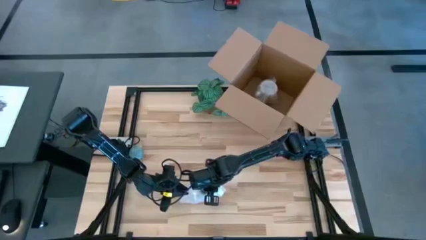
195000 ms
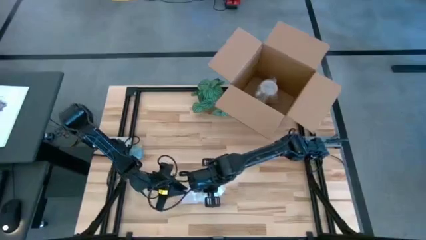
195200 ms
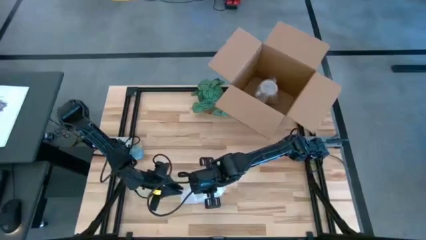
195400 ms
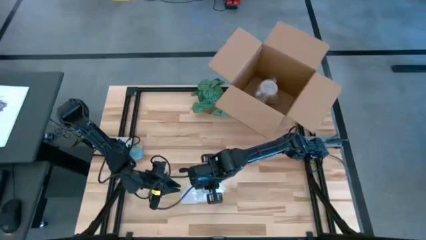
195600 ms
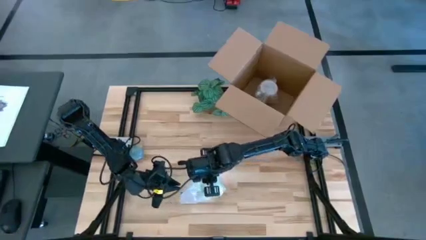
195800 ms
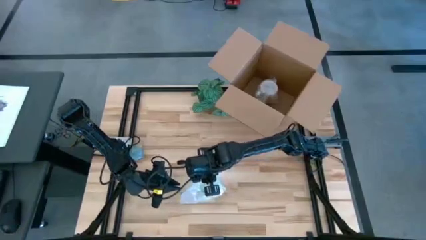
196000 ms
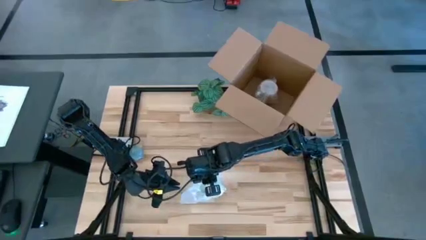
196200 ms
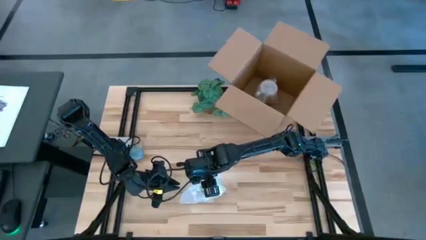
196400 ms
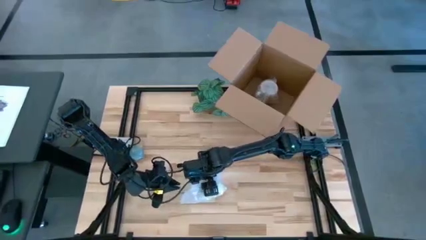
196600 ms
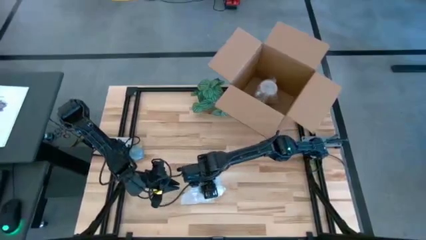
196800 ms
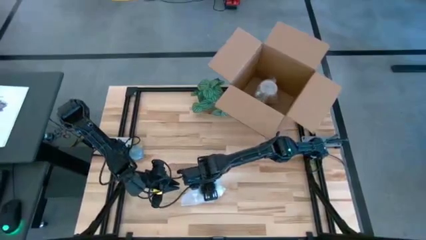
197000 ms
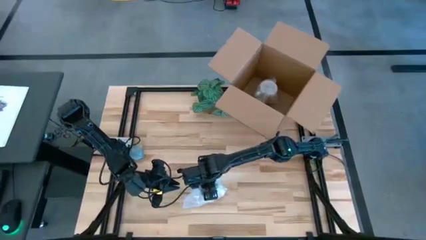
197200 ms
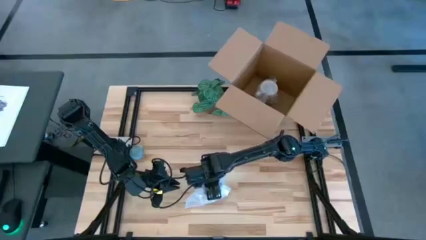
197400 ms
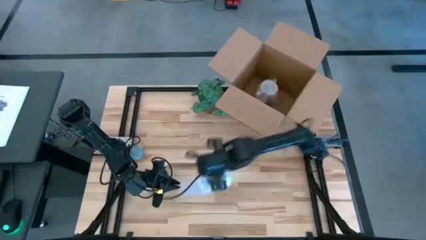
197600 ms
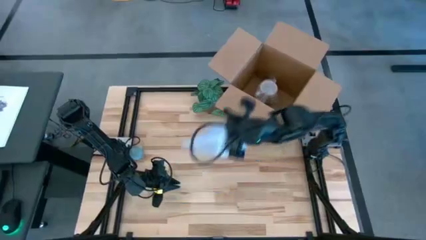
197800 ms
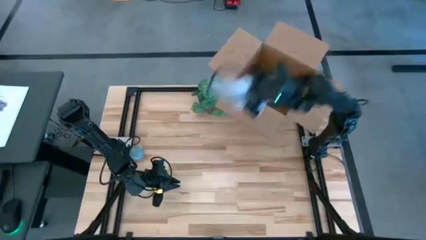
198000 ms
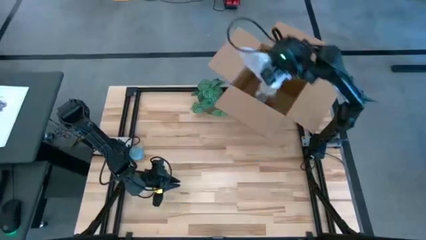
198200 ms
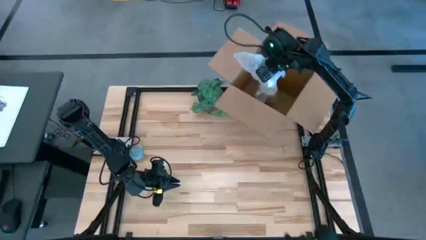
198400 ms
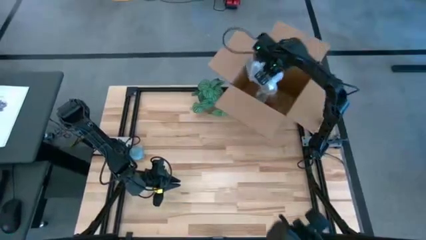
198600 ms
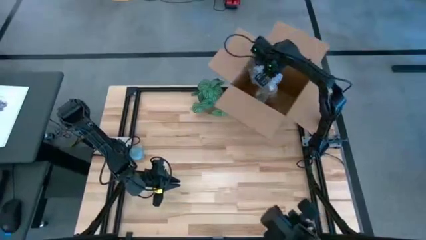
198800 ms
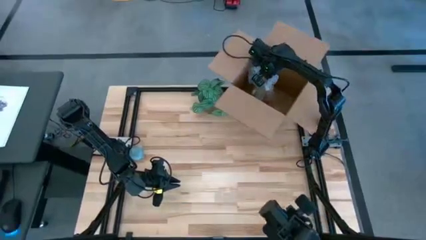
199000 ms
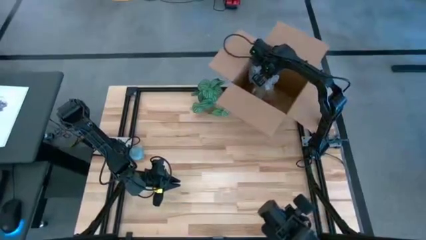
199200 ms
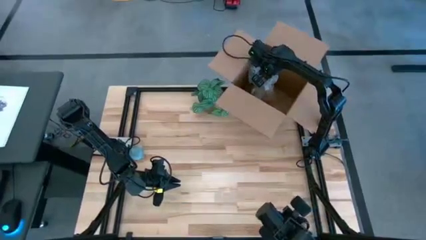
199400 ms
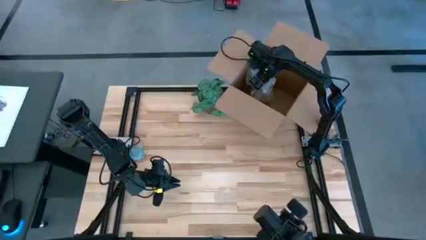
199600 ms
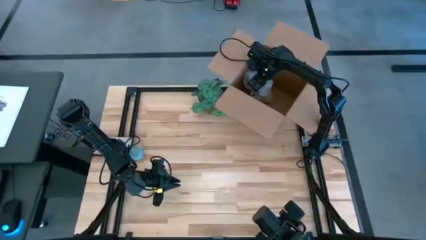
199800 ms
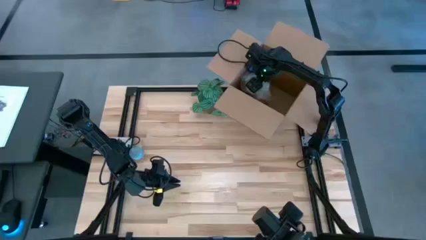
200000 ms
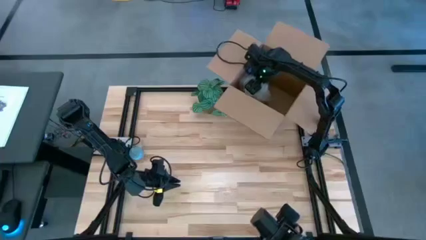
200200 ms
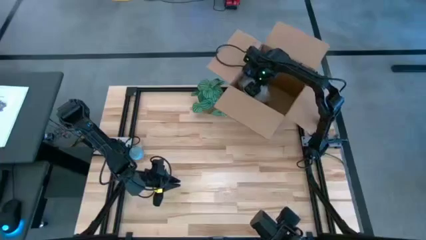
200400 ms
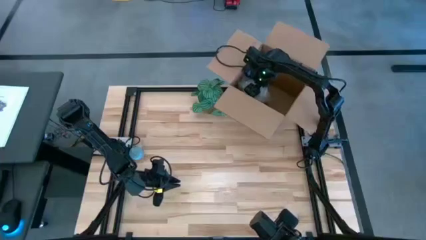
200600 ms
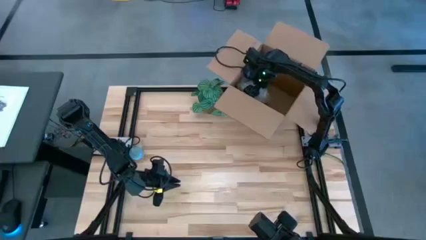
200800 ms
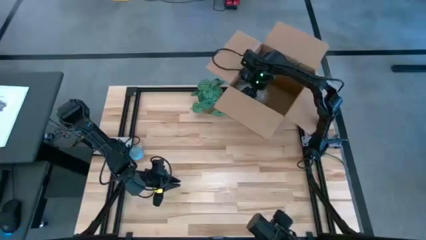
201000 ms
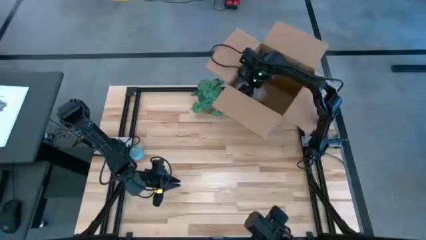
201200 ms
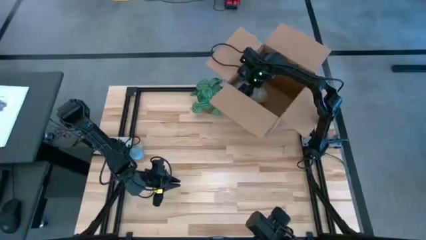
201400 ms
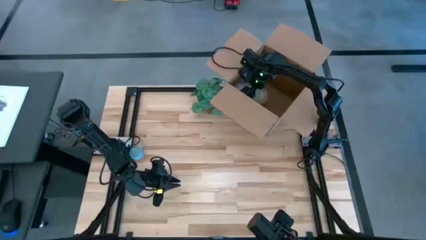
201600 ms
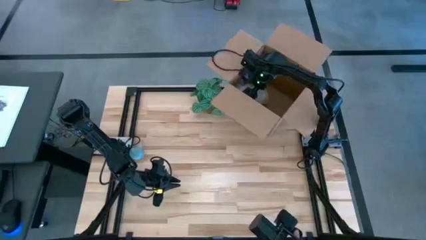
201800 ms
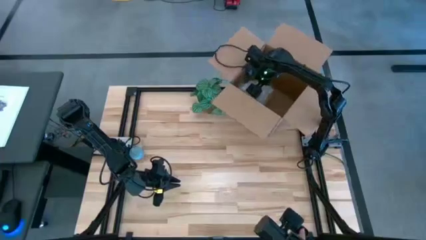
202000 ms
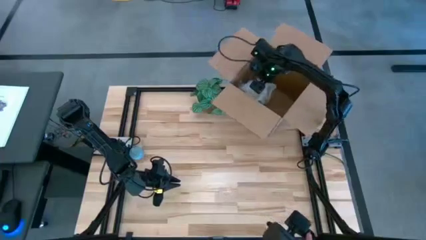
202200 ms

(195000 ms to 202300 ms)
Task: wrap mug
Put the wrapped blue mug into the cardboard box

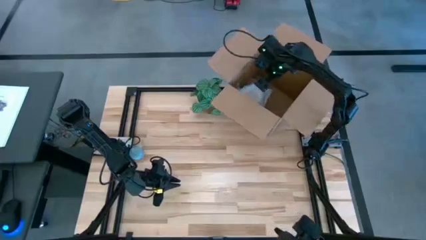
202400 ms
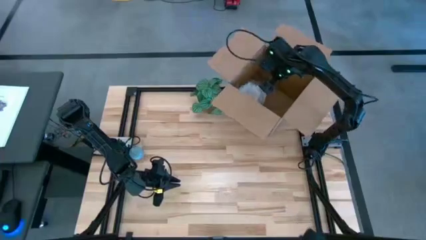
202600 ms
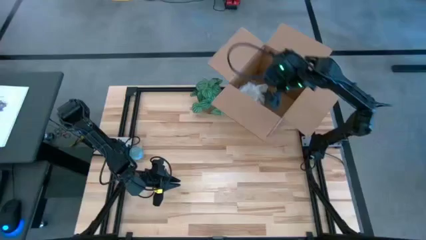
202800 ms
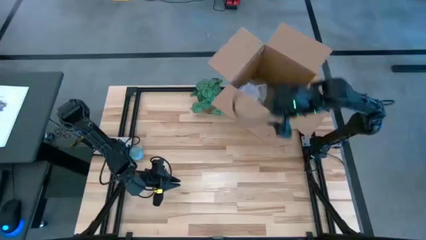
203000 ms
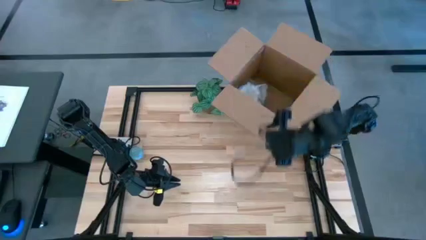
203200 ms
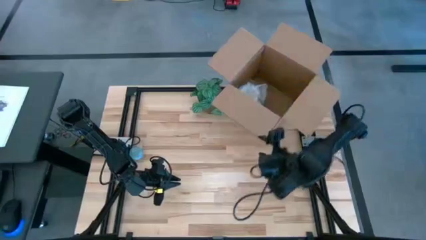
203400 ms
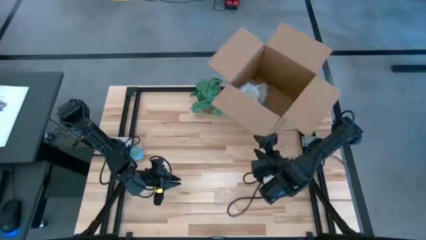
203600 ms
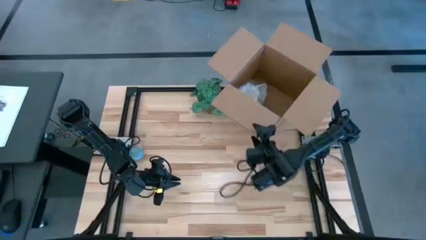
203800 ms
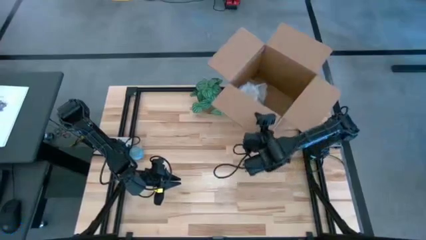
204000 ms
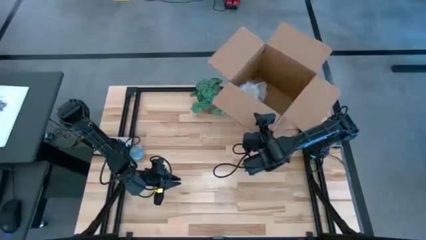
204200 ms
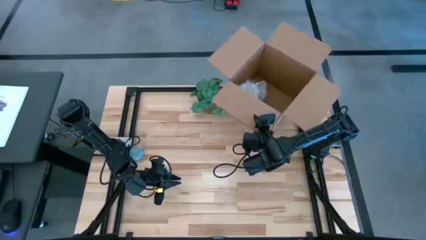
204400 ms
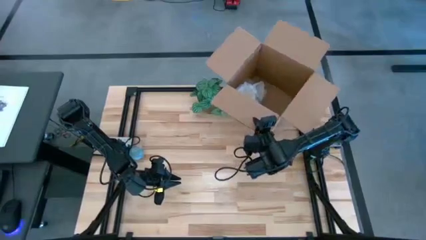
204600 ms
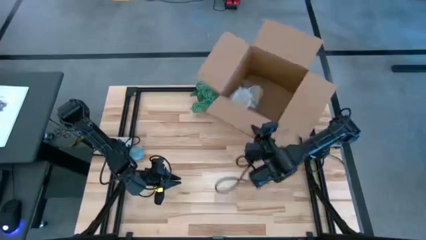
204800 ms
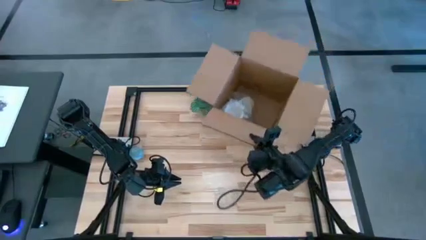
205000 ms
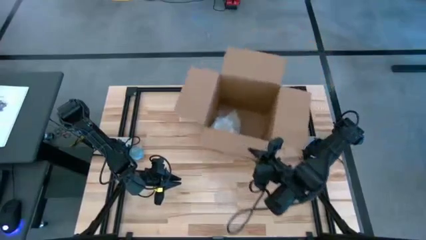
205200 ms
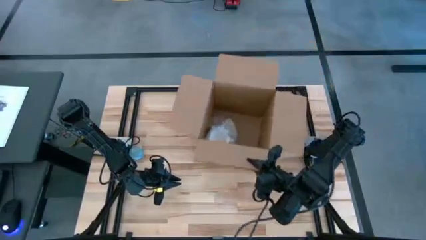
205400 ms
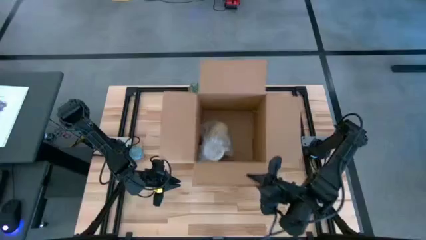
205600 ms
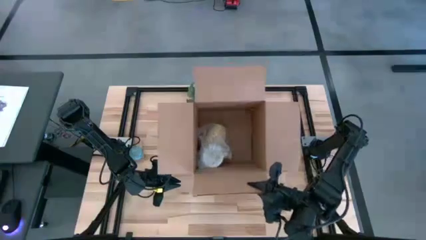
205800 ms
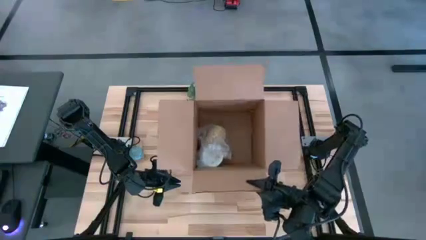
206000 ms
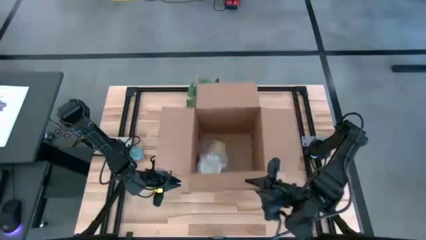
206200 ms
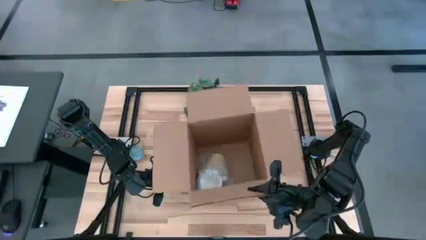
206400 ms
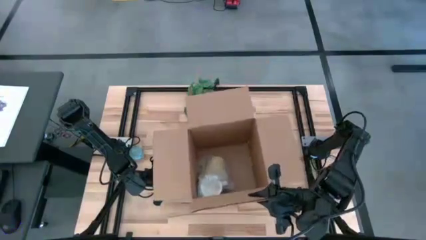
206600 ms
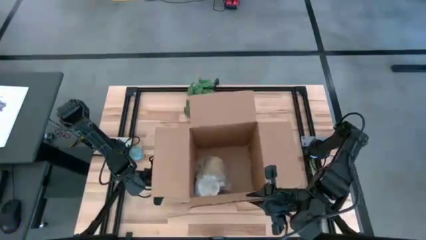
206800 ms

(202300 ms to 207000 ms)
Move the cardboard box to the center of the table

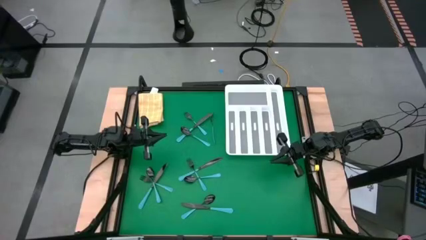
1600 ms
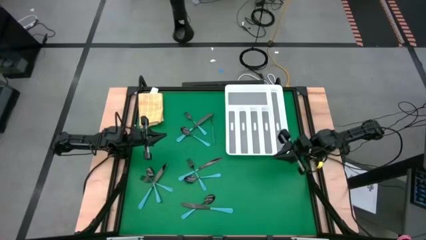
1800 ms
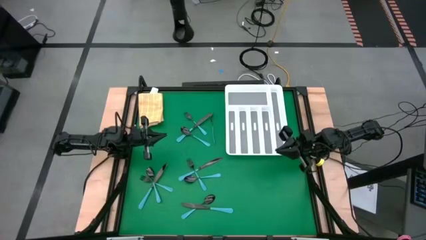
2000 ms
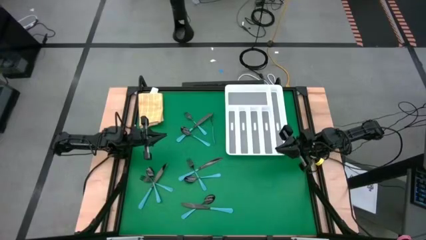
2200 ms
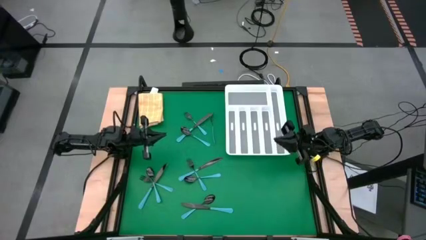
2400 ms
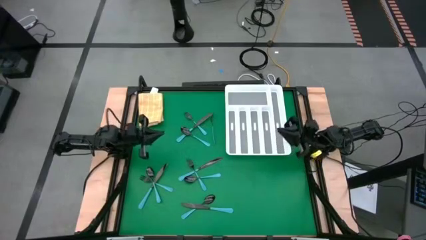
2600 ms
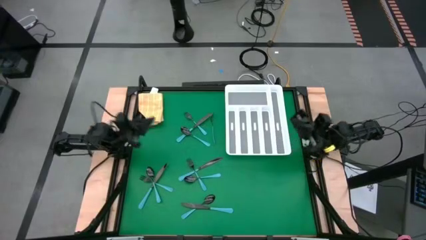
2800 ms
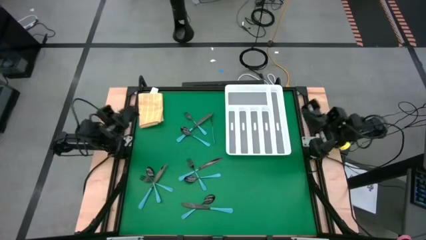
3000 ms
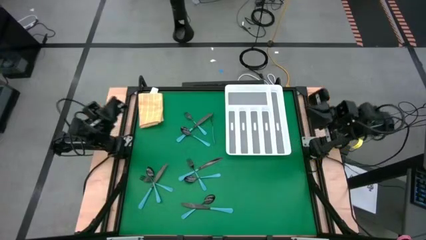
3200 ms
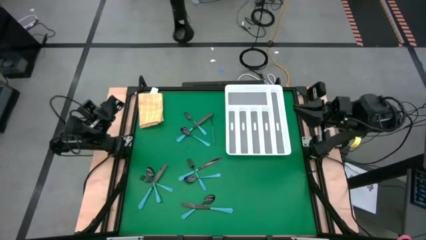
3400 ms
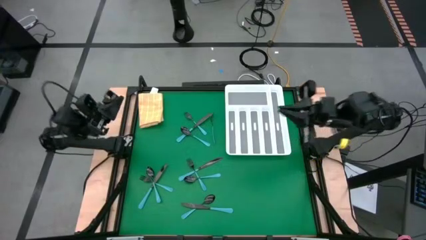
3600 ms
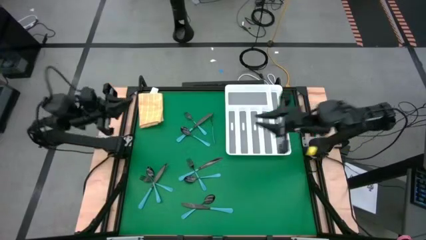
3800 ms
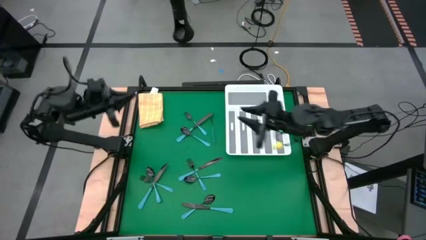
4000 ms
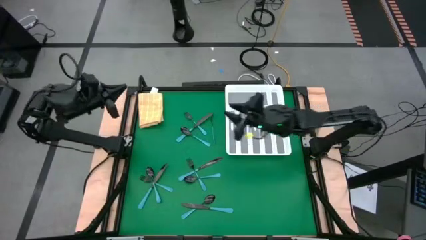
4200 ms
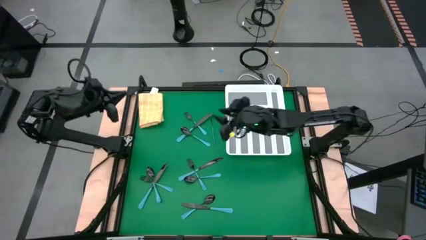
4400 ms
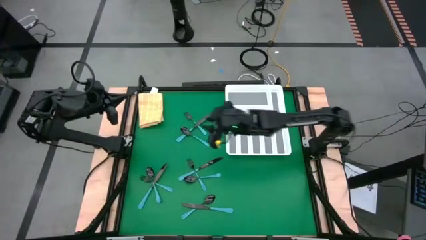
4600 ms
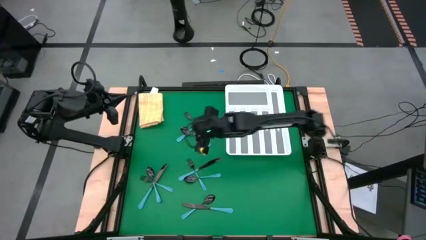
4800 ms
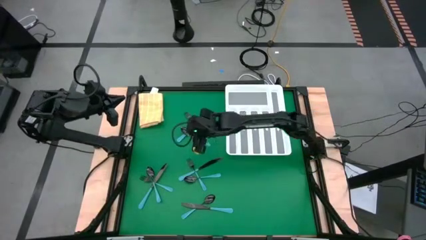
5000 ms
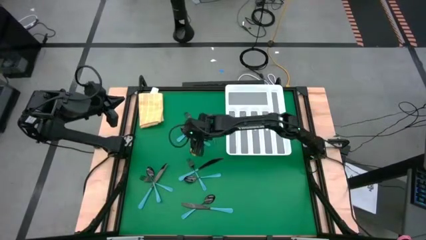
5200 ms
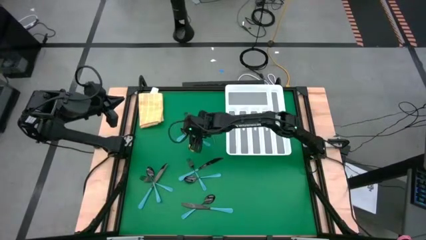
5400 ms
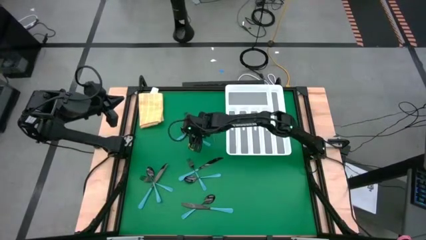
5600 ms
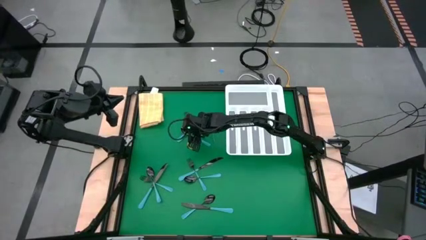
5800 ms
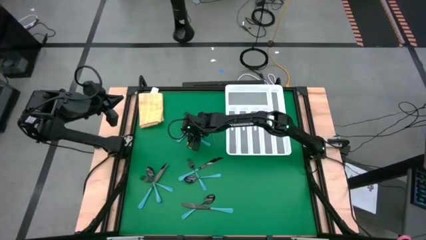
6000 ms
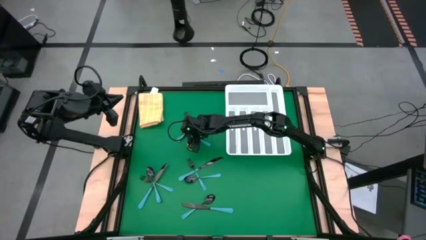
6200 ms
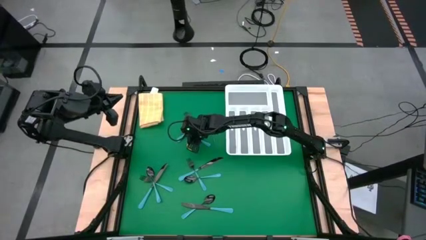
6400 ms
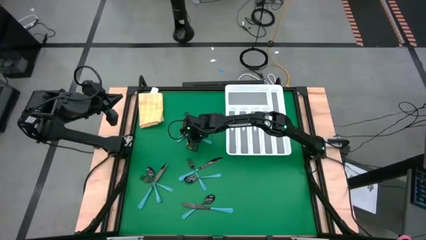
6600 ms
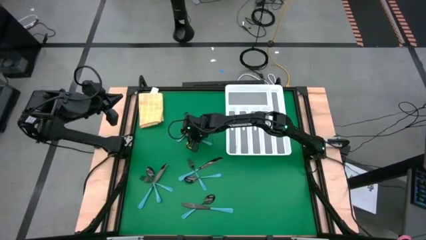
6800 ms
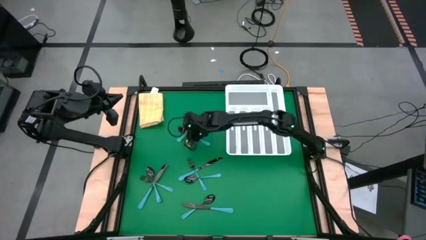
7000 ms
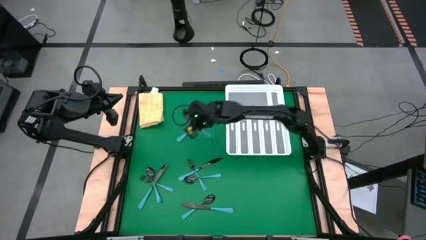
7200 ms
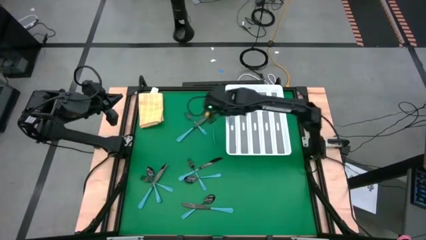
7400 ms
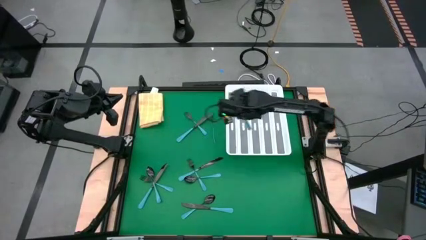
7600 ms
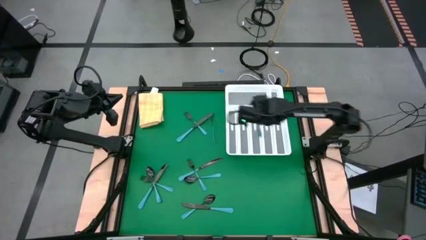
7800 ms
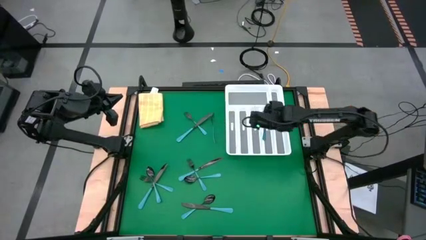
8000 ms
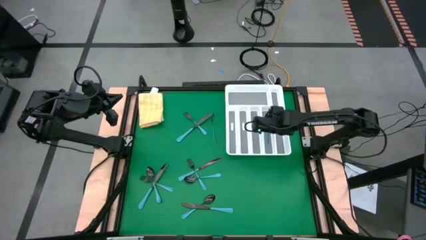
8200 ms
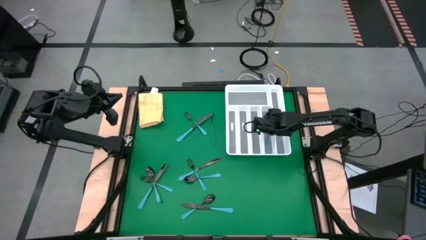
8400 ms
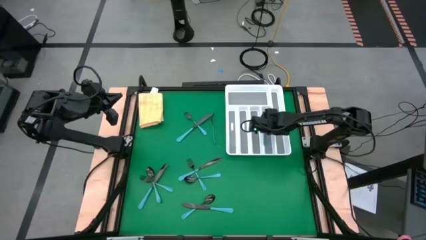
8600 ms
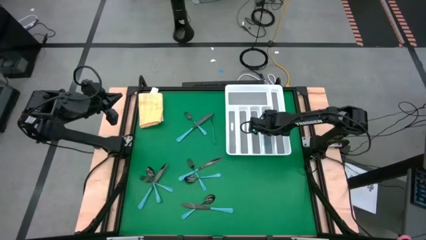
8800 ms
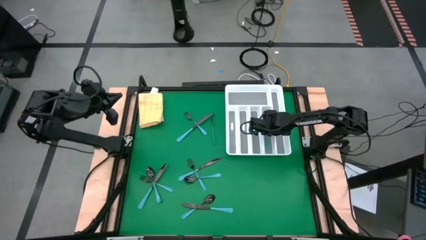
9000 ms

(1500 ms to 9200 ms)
Task: Sort silverware
Put the blue spoon into the white cutlery tray
